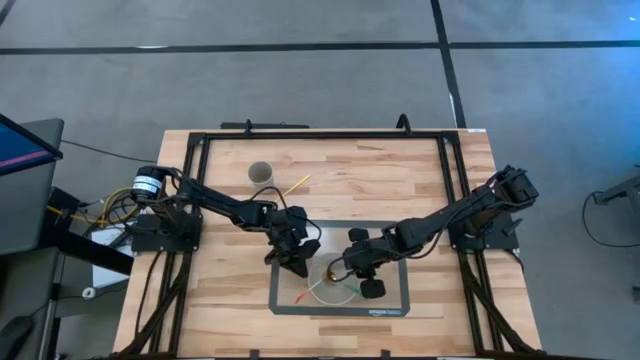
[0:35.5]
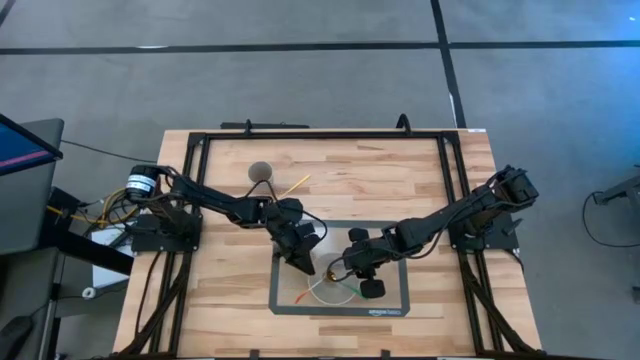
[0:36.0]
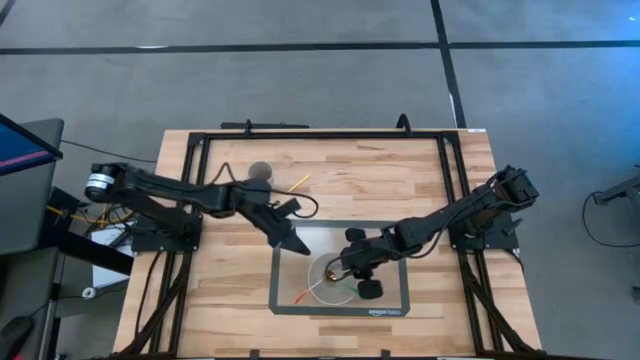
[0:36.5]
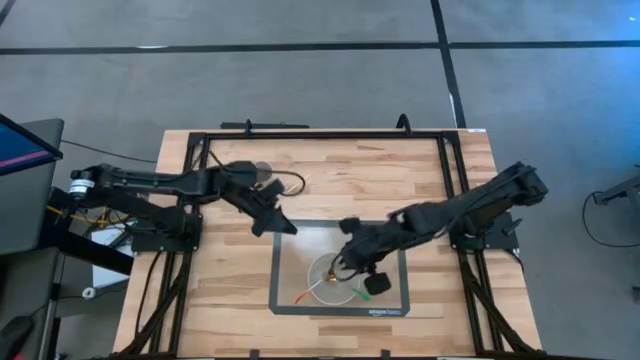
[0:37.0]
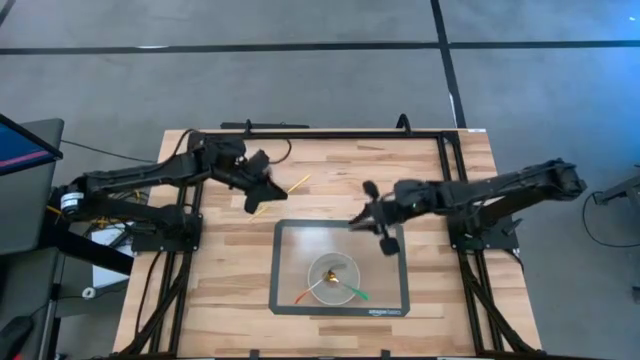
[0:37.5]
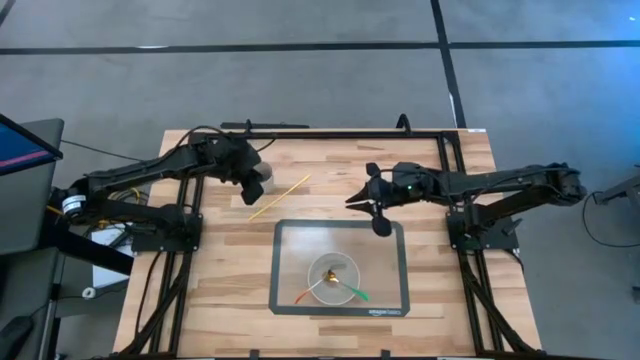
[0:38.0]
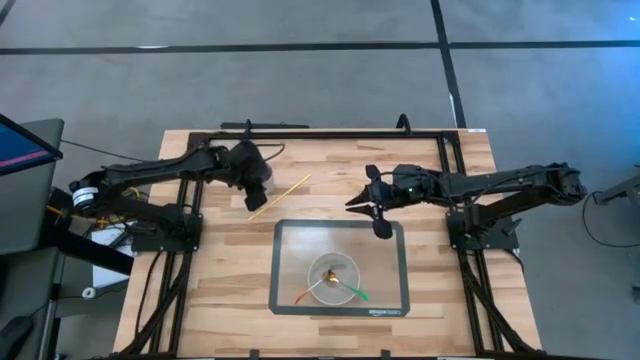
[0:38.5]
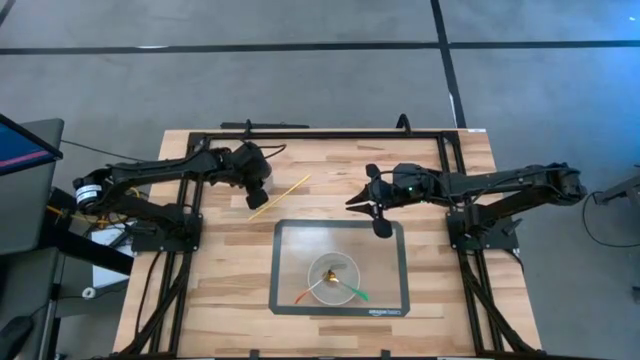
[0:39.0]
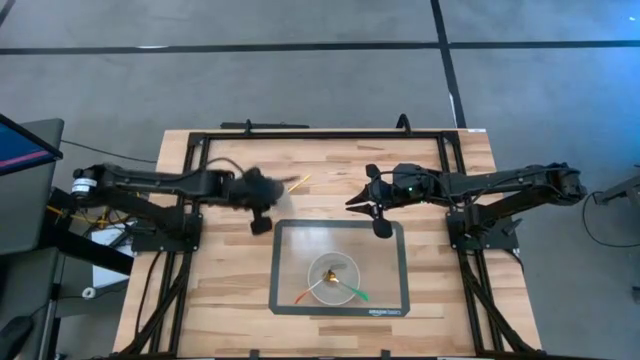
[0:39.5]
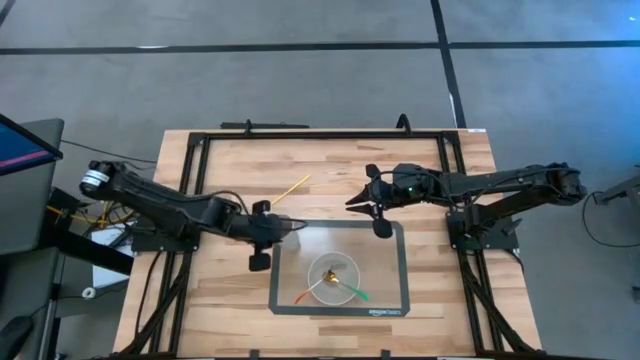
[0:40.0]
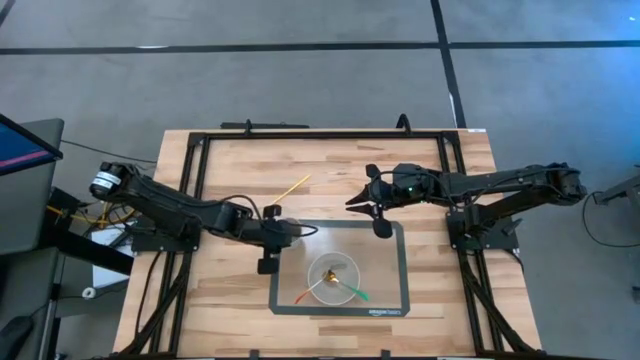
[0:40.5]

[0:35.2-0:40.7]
Task: Pick & Place Utensil
Put the gray cup on the mat at the top left of the gray bowl

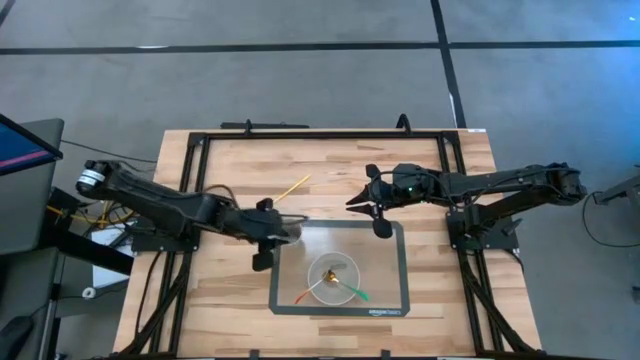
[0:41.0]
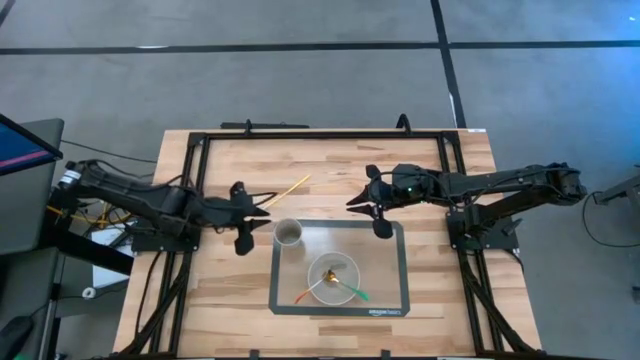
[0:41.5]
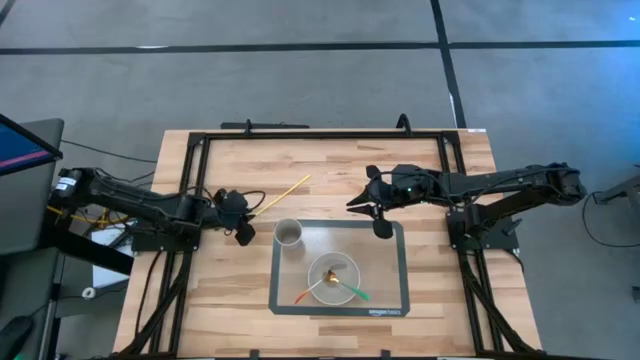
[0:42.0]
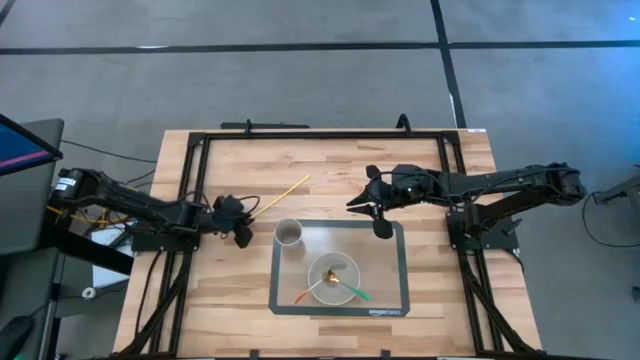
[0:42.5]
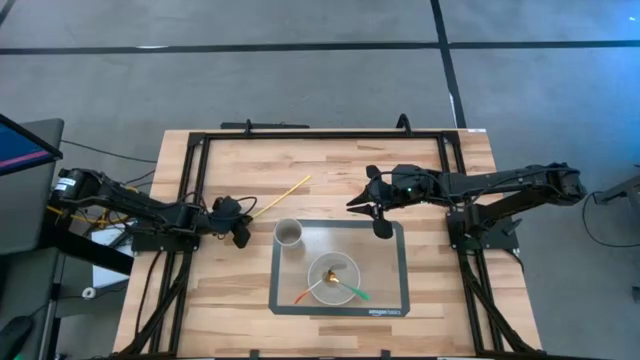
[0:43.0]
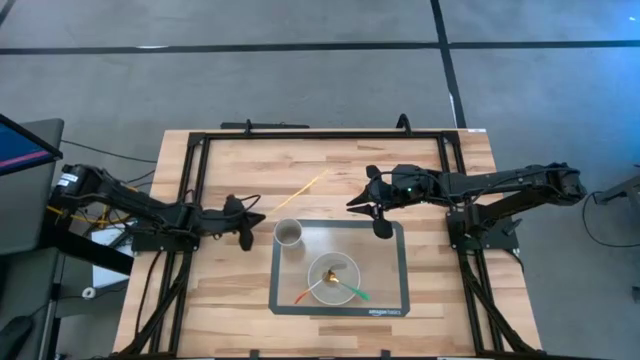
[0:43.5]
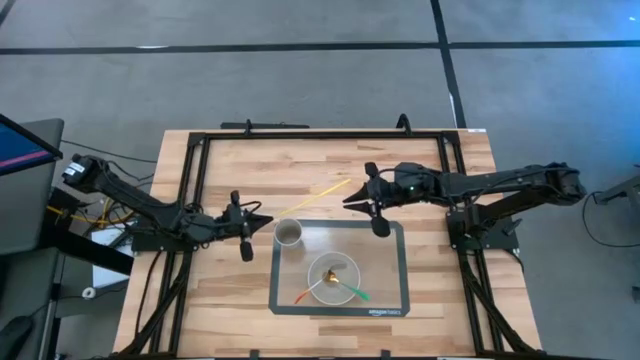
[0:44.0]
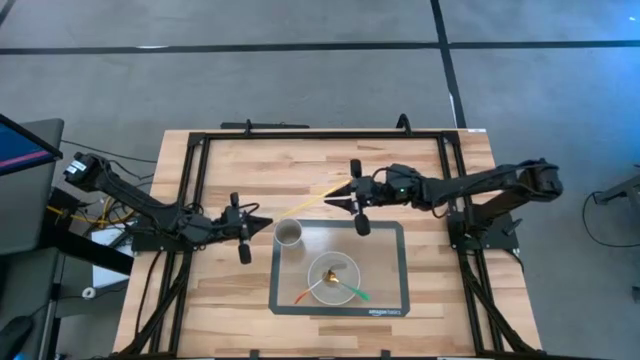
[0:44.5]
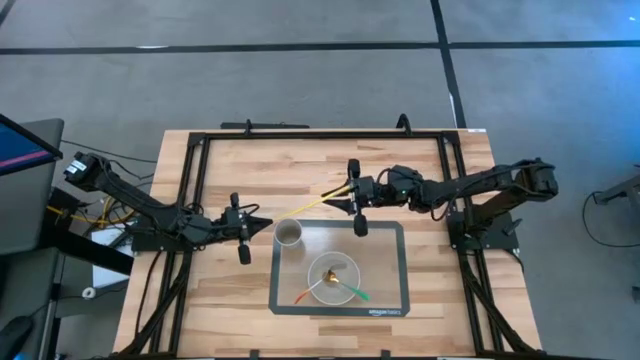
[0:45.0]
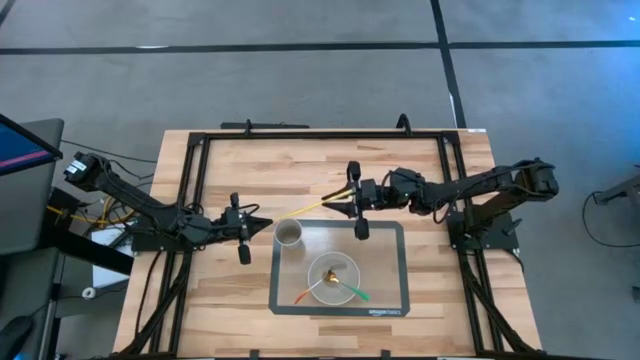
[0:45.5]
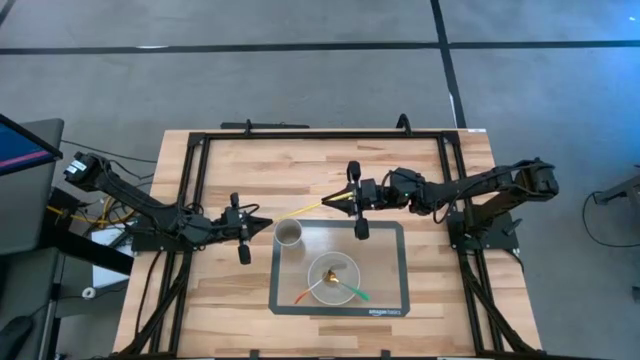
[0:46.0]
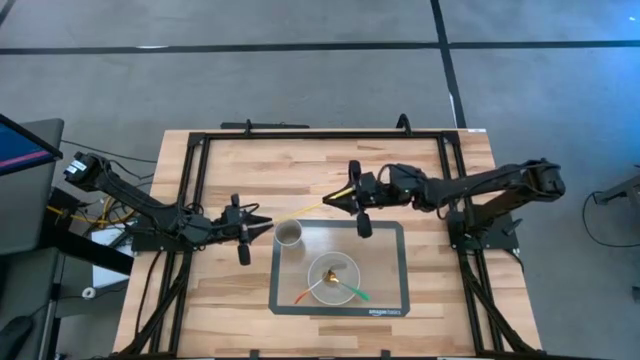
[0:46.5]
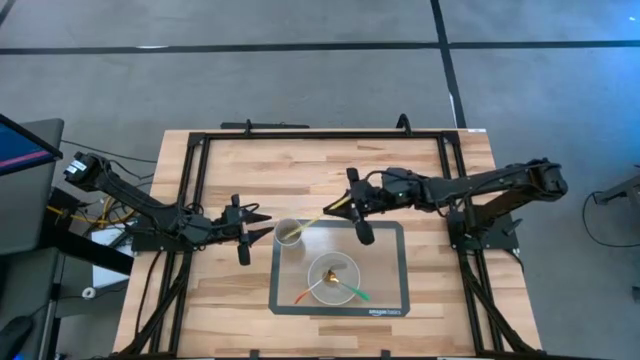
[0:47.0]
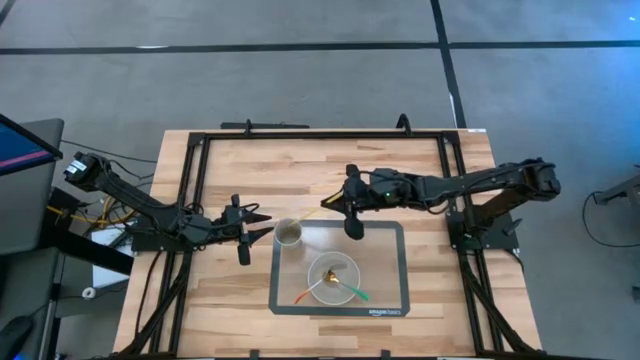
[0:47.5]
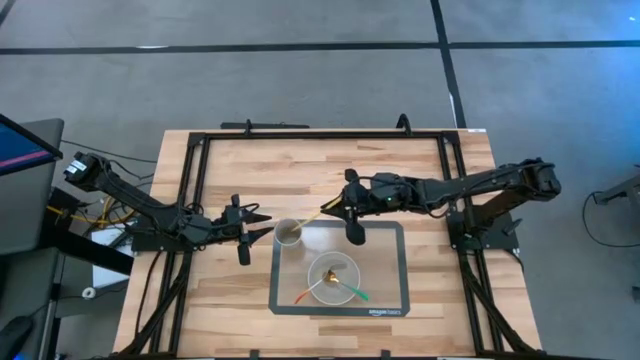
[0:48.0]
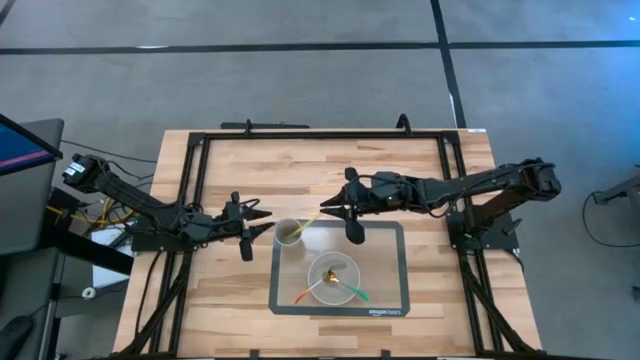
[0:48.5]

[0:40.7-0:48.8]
Put the yellow straw into the gray cup

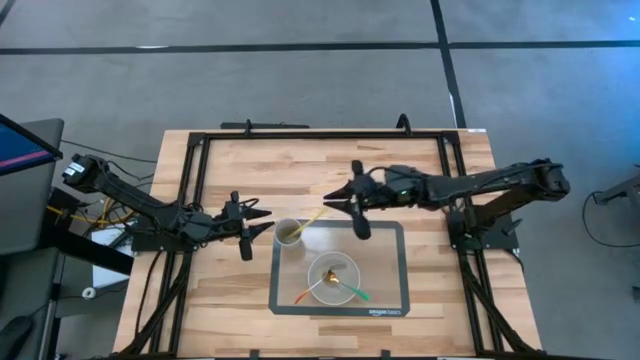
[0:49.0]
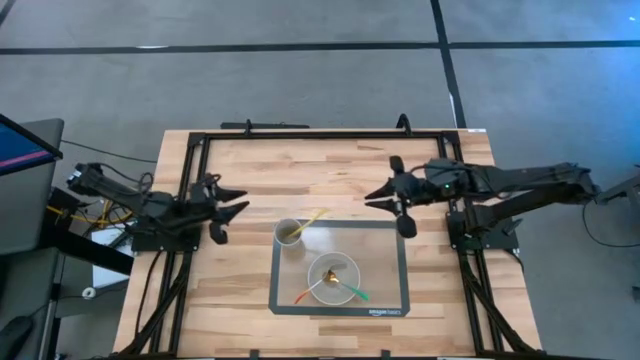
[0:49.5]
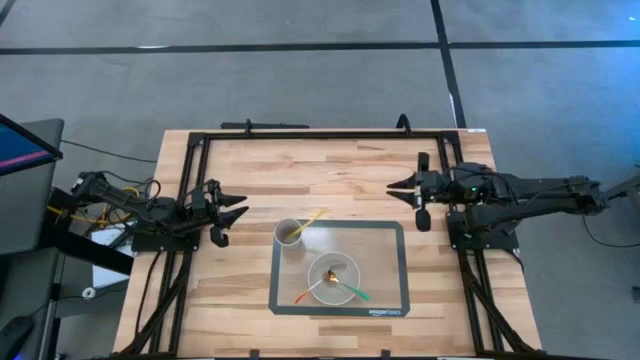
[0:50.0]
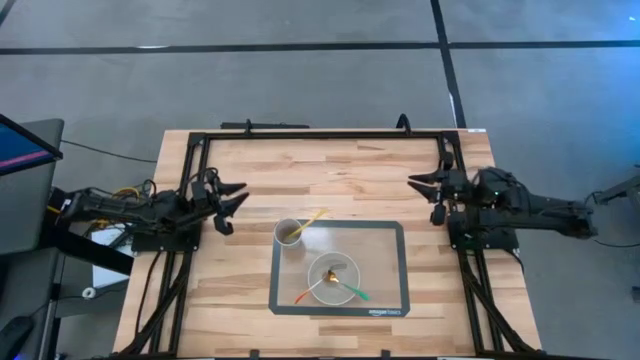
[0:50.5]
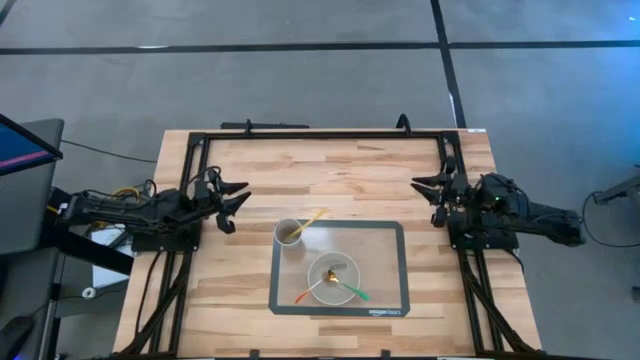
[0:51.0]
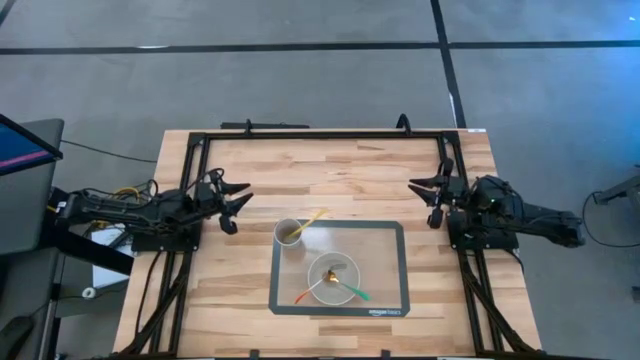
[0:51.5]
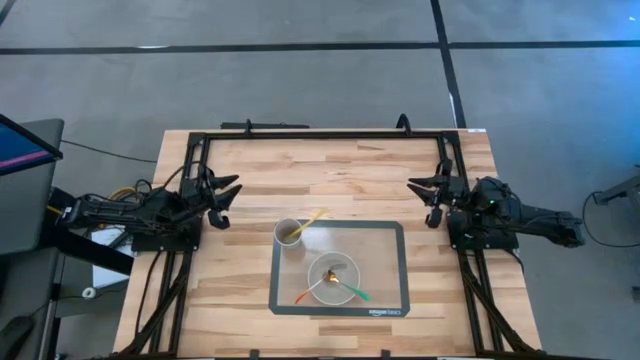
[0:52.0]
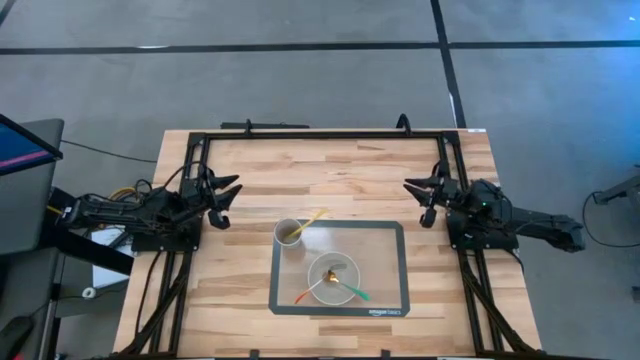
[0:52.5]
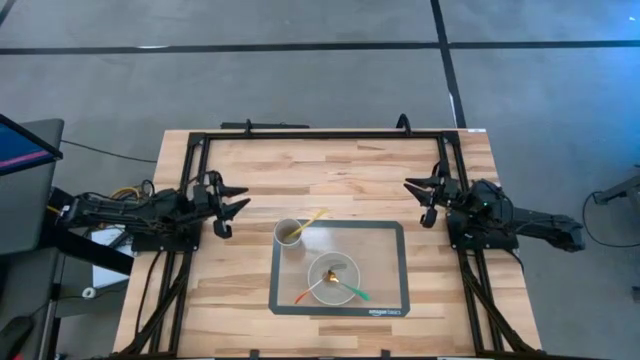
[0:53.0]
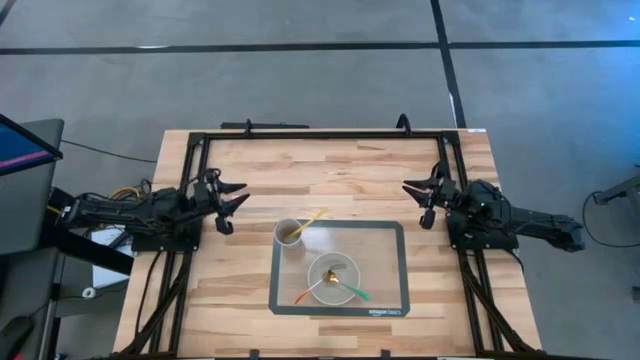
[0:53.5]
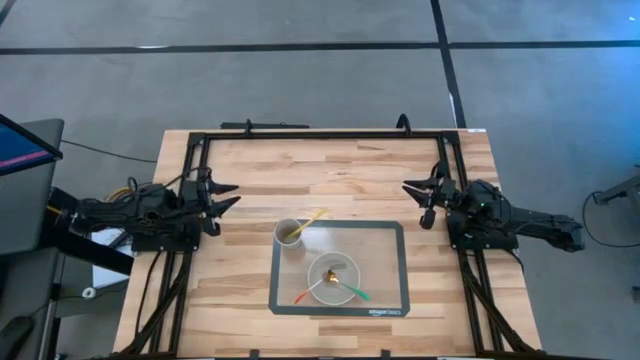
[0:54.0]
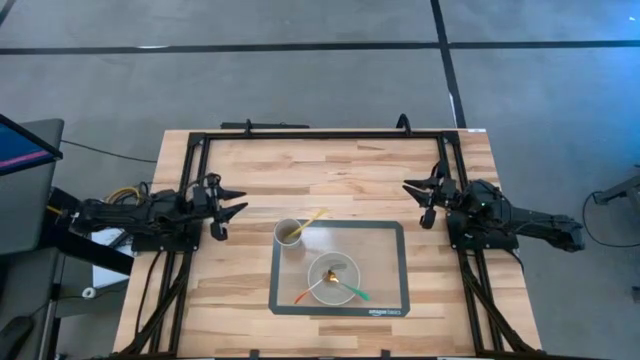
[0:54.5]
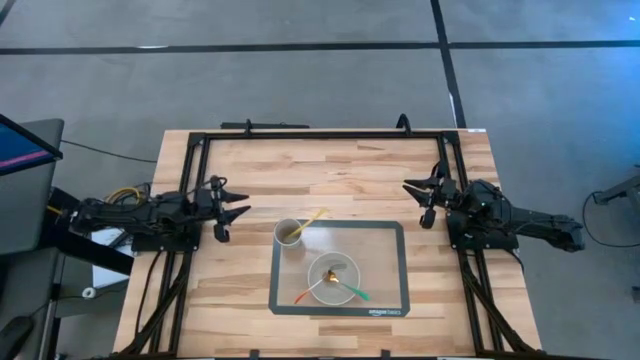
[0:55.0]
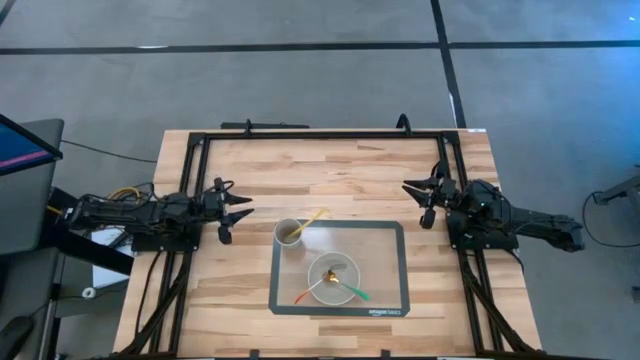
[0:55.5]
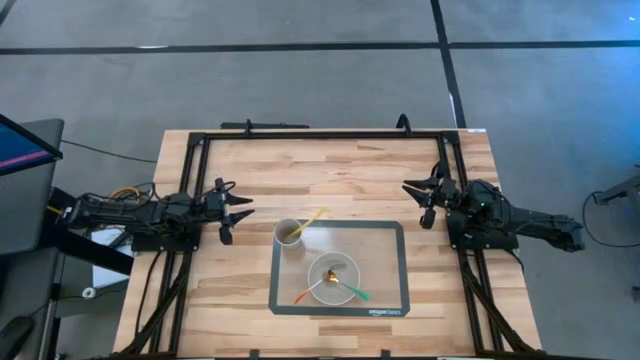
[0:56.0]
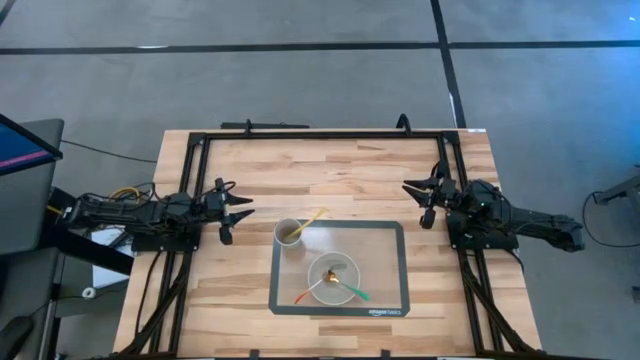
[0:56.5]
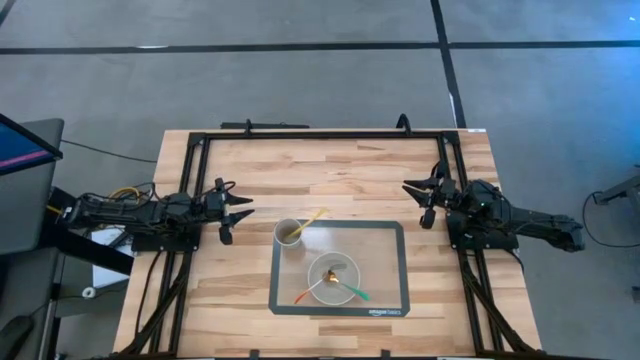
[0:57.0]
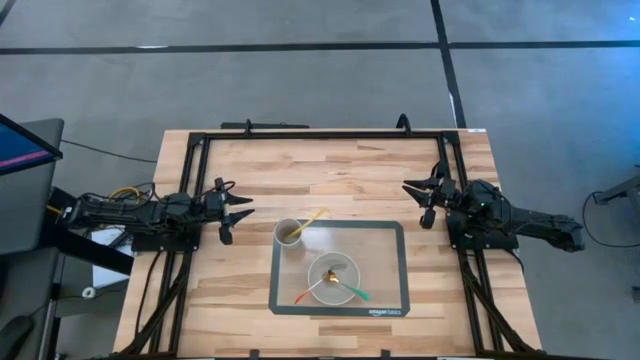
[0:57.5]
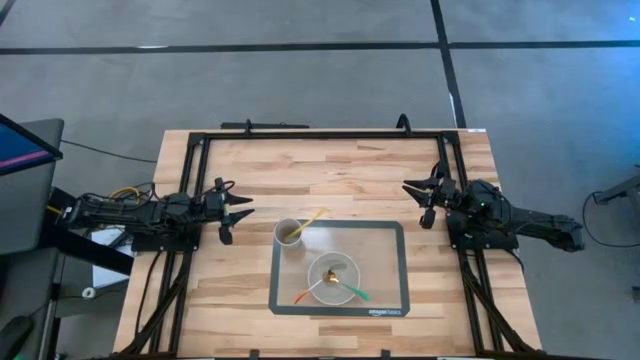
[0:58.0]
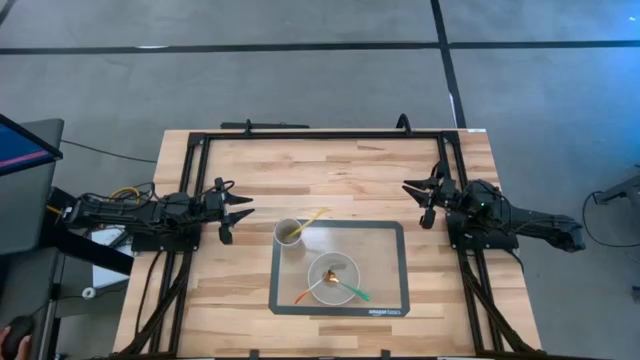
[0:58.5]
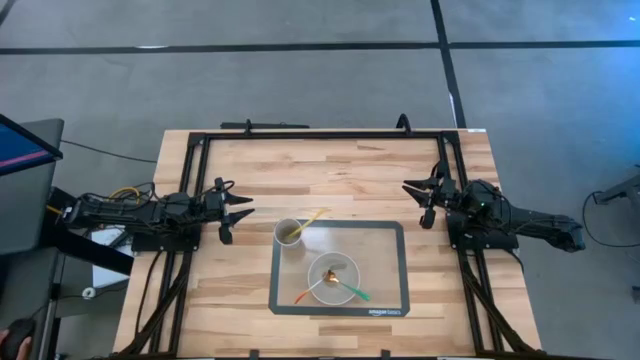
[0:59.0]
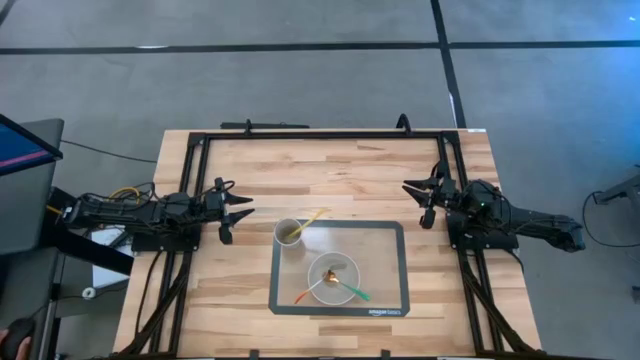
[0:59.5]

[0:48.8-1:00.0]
Return to Home Position
